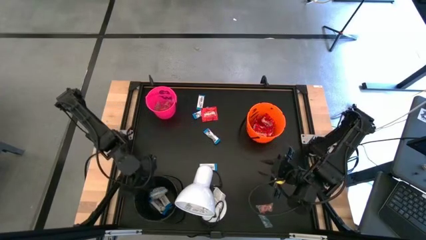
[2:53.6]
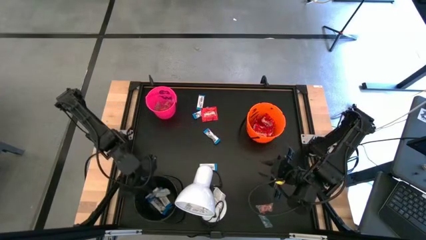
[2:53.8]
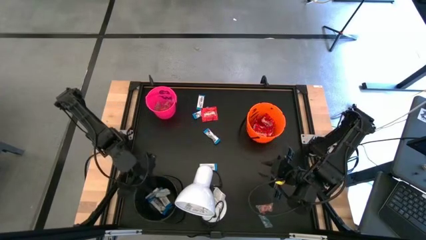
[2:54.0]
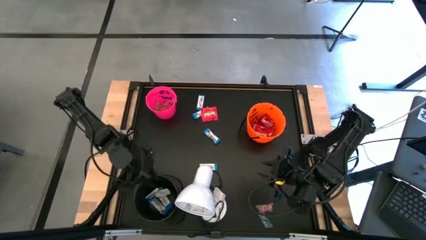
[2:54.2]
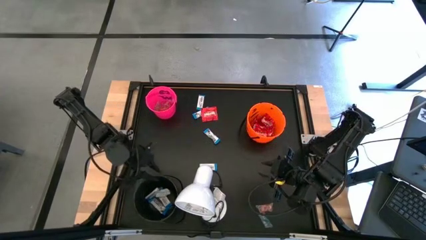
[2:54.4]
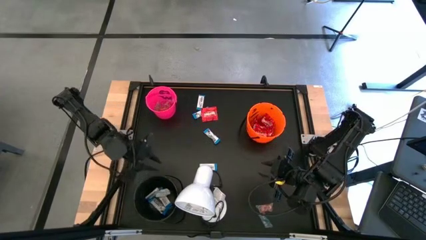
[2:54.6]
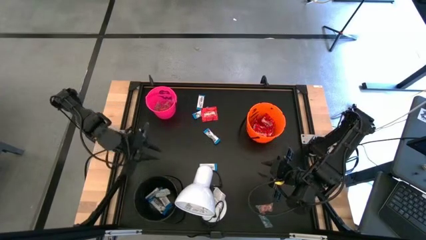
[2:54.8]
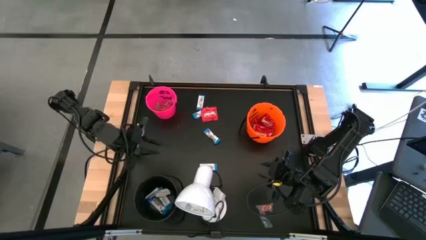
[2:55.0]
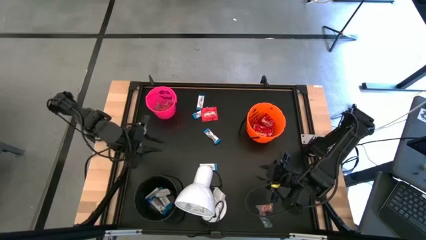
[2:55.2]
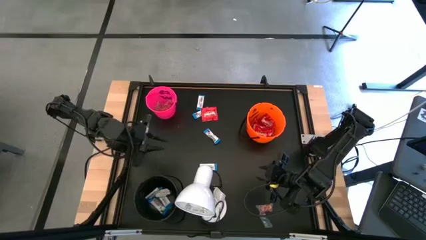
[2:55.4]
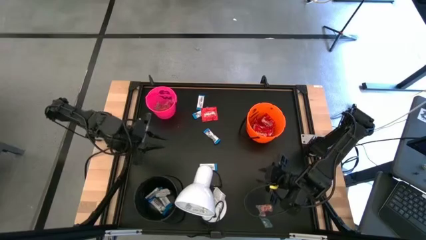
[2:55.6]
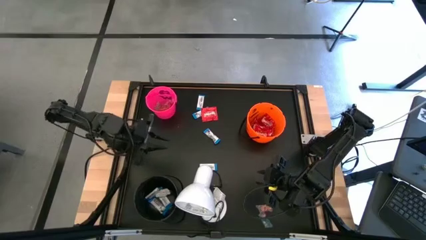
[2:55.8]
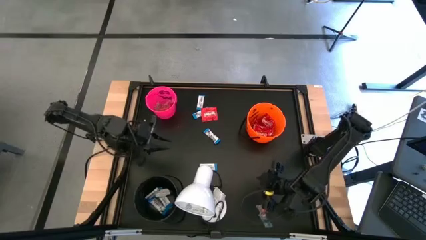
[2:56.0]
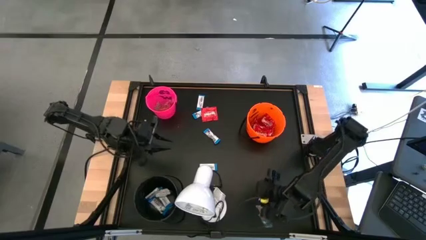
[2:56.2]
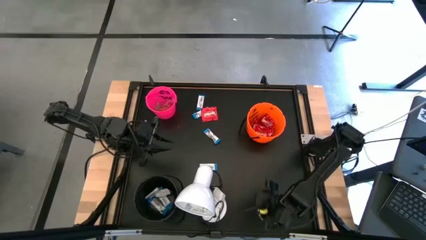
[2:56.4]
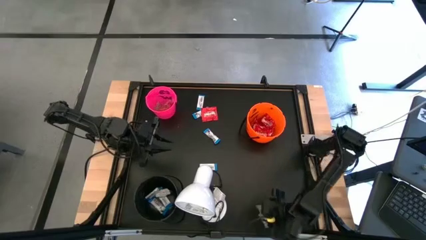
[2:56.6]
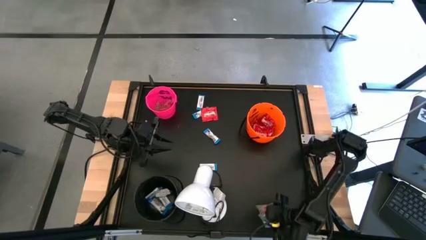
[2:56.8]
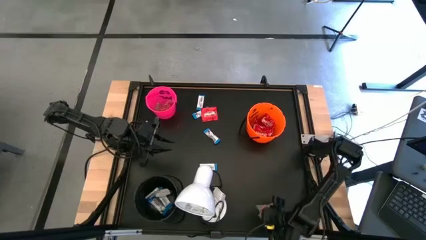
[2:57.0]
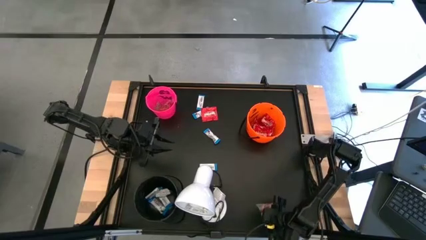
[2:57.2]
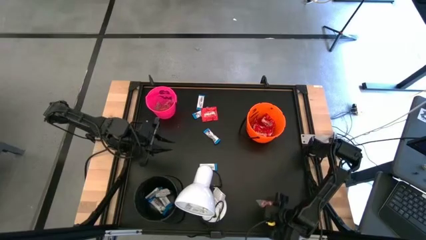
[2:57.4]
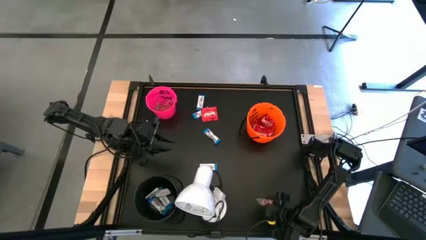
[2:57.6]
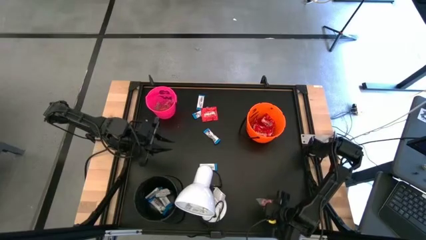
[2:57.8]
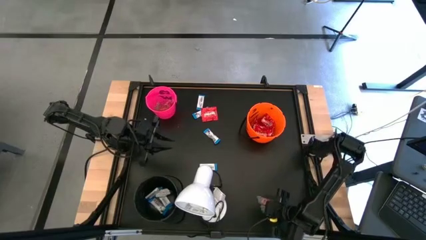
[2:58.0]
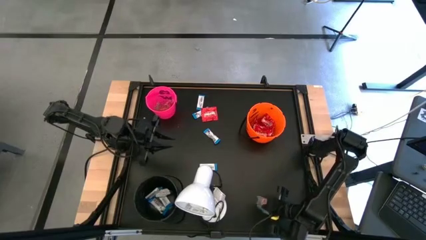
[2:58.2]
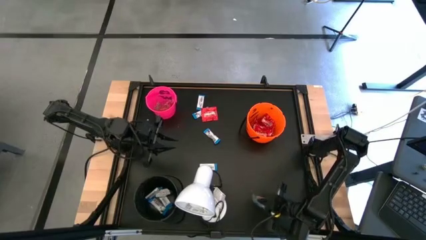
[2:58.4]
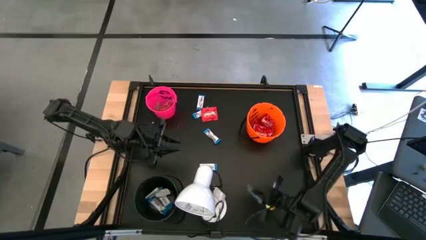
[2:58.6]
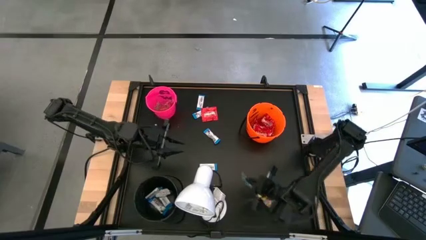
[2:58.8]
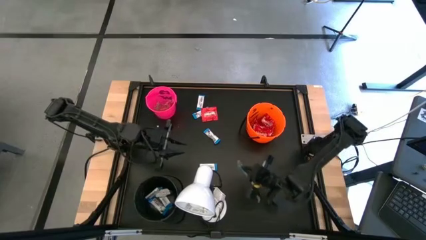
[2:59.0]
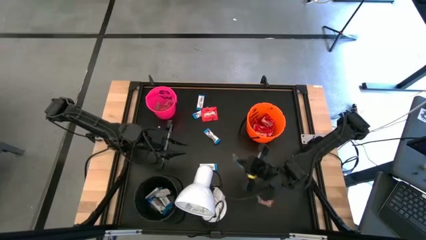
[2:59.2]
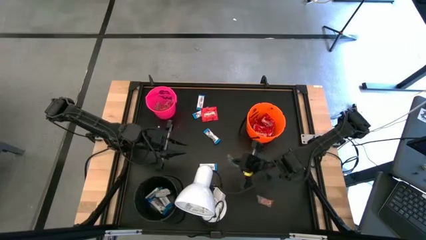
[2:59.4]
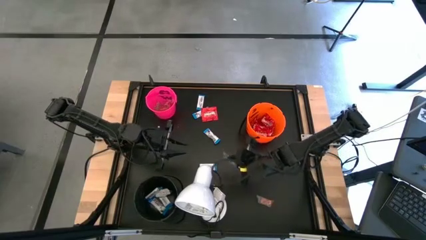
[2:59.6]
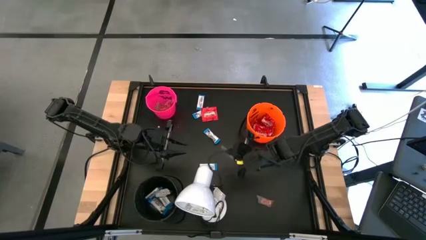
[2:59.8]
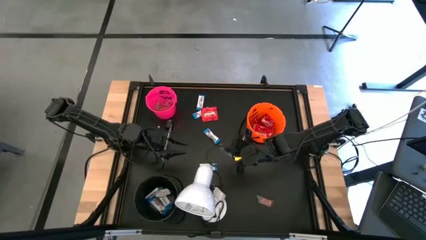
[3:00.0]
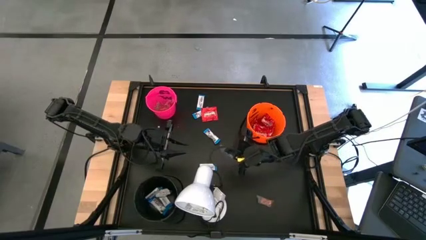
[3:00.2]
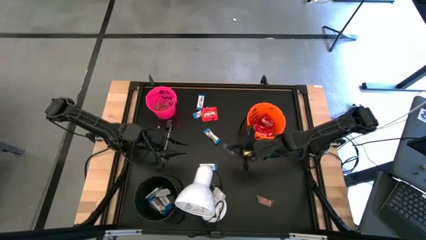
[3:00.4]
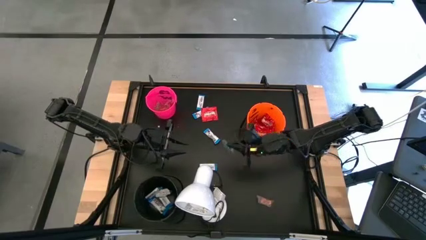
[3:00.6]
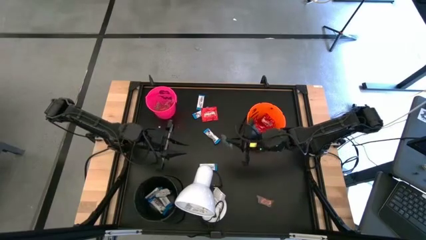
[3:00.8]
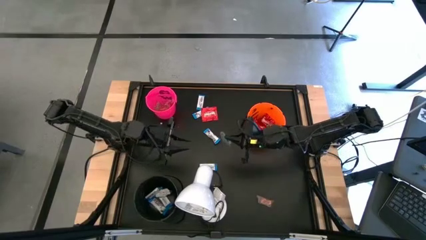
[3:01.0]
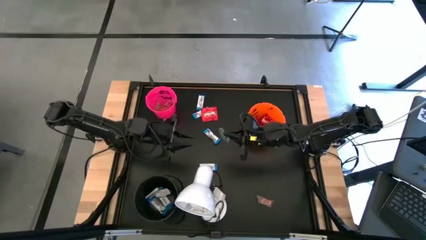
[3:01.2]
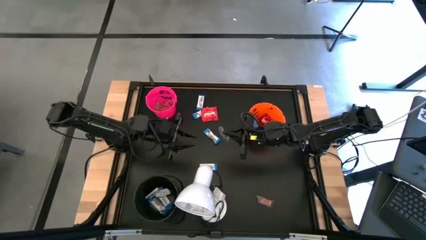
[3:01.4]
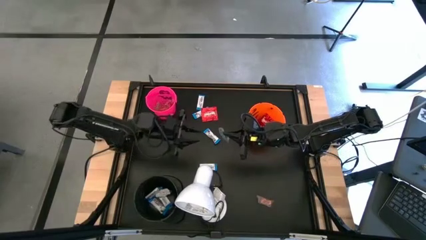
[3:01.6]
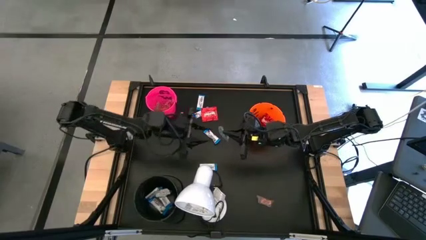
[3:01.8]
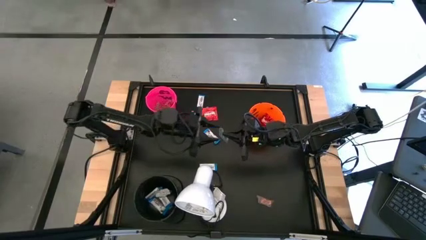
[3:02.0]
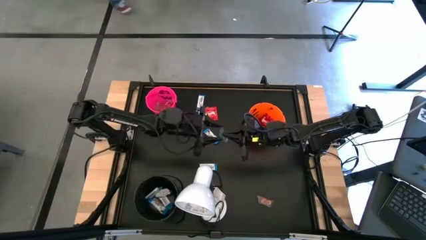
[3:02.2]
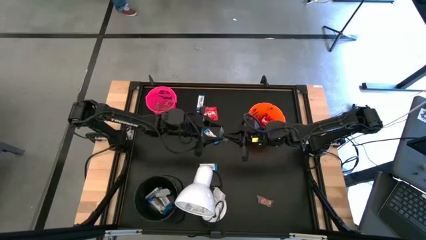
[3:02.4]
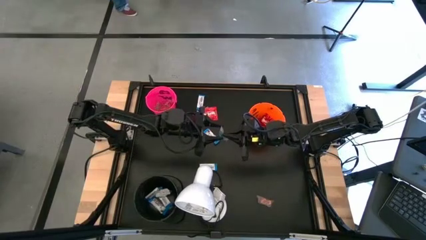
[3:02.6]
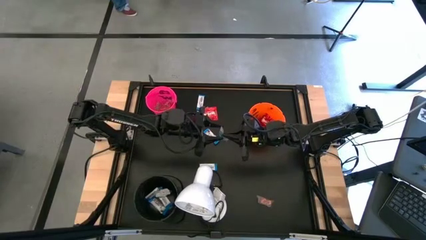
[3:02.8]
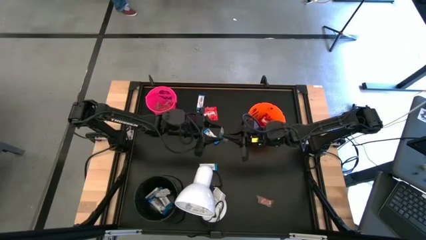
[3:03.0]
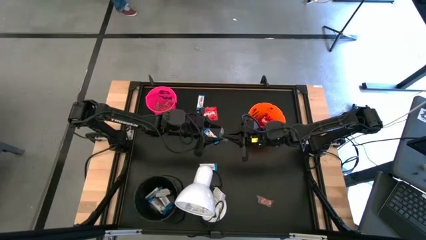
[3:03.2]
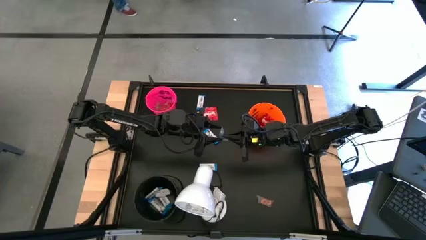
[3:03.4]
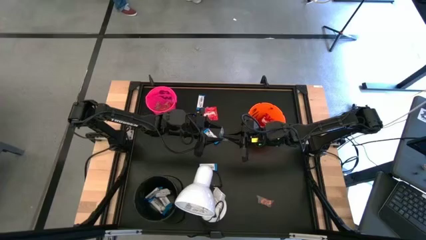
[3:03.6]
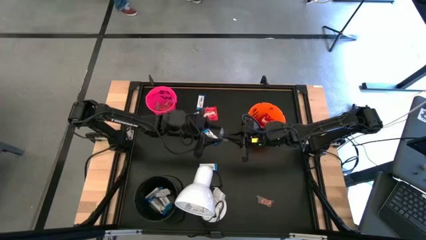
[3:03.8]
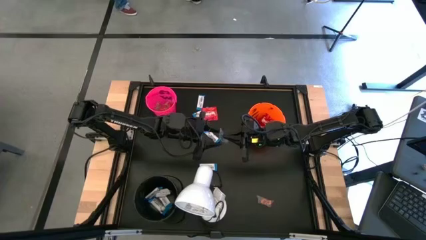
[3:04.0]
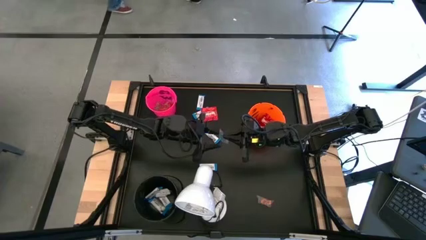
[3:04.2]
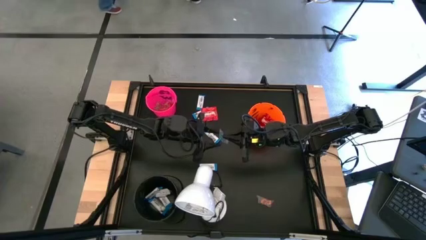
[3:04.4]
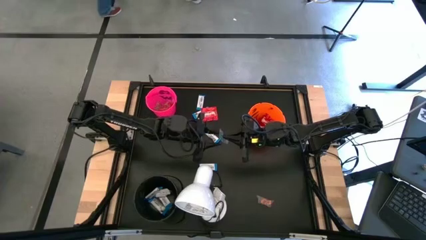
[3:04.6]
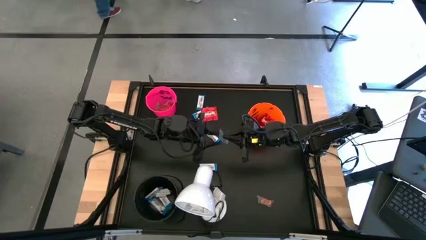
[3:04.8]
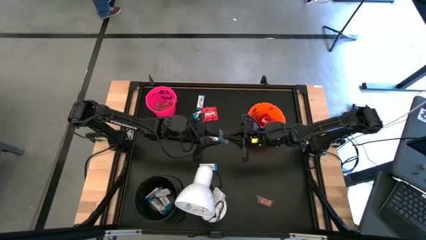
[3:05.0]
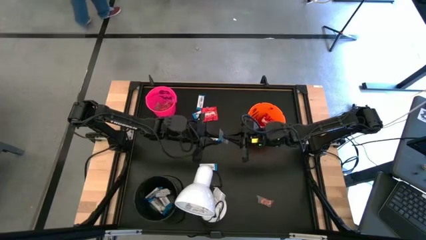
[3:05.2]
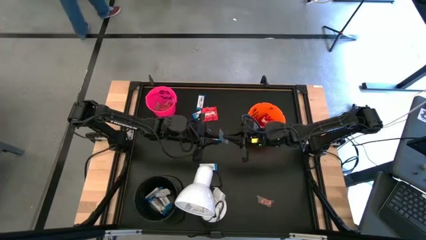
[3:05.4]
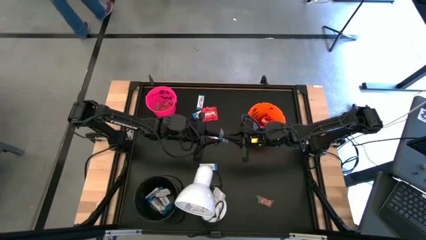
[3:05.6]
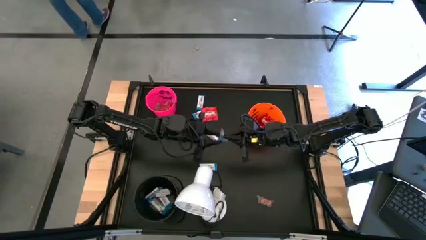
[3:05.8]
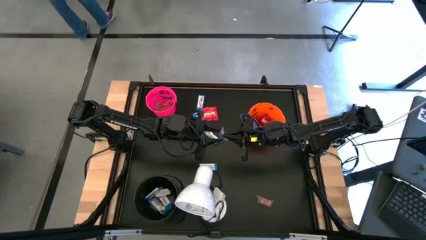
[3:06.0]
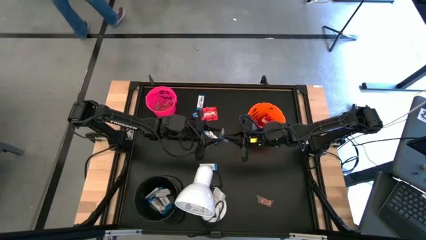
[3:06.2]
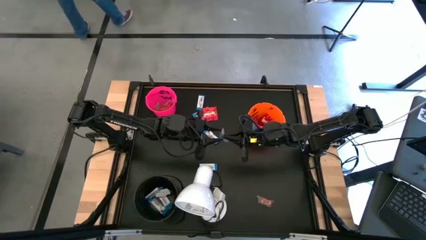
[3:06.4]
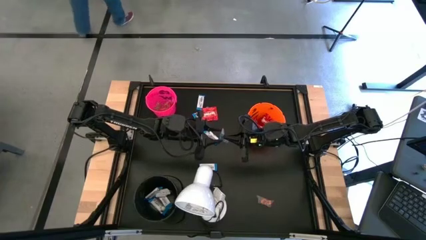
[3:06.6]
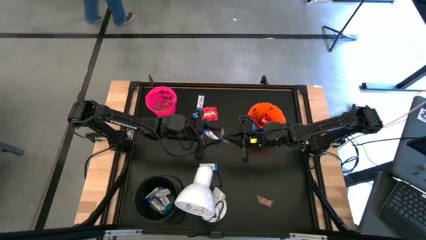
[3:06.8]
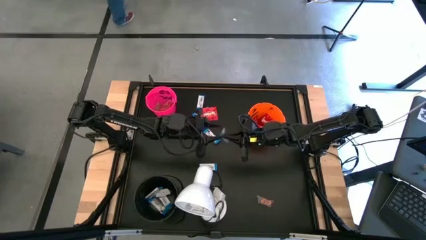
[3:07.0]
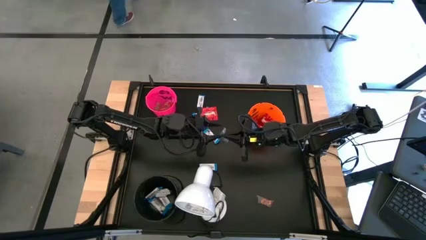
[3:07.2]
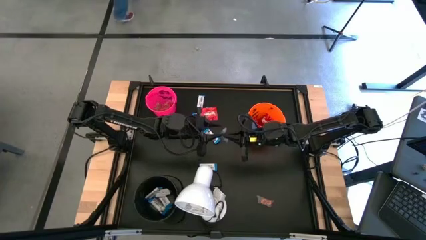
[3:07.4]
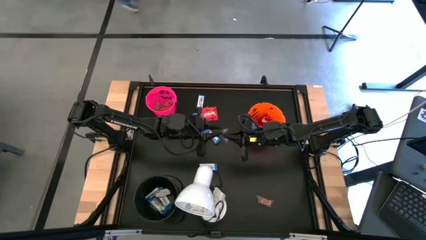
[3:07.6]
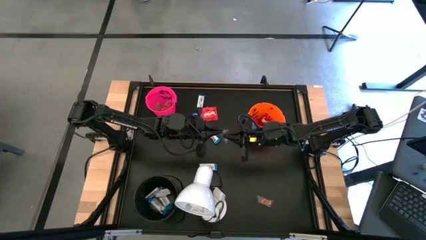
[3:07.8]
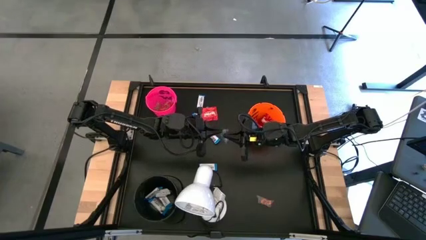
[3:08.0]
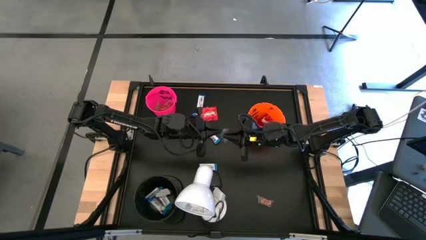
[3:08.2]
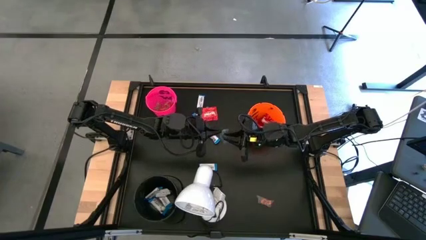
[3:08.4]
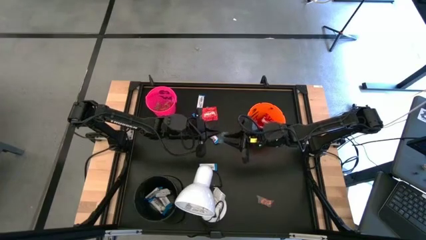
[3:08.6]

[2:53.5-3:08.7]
Task: Sort candy
Put the green gummy into the pink bucket
